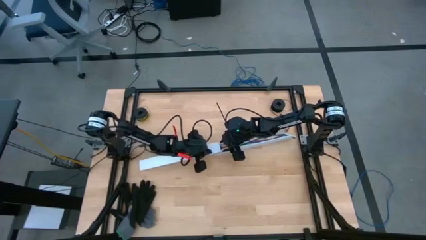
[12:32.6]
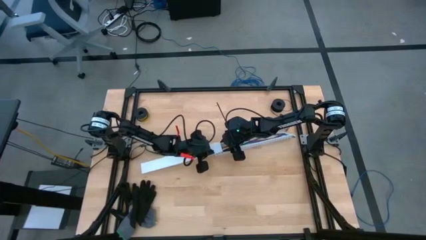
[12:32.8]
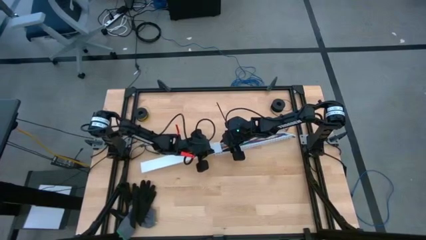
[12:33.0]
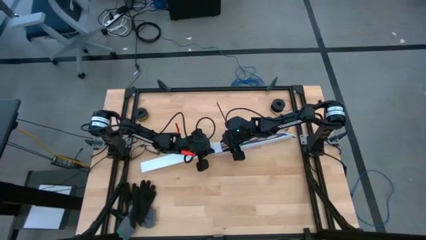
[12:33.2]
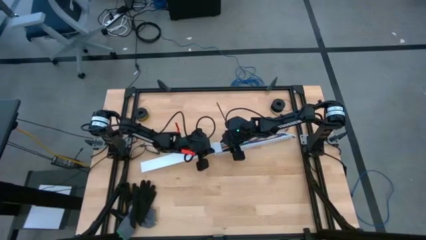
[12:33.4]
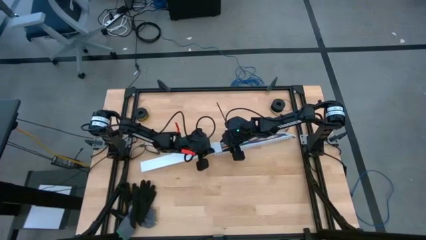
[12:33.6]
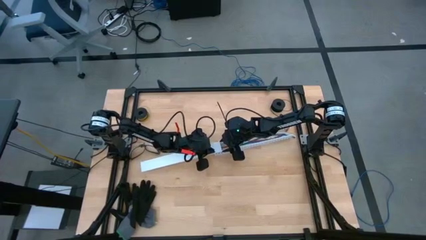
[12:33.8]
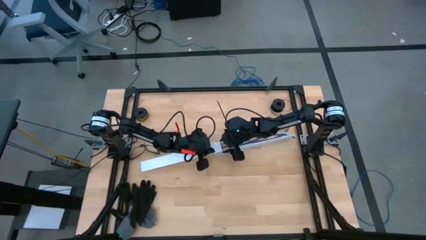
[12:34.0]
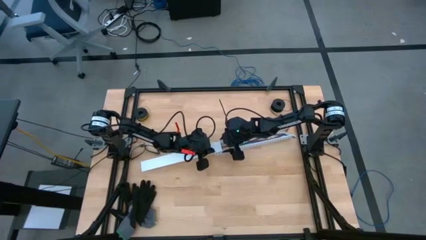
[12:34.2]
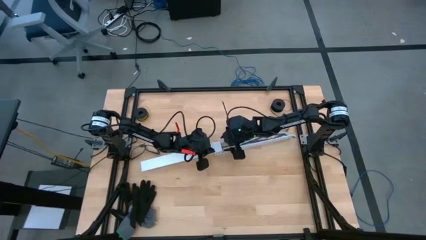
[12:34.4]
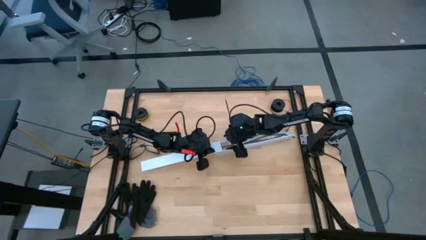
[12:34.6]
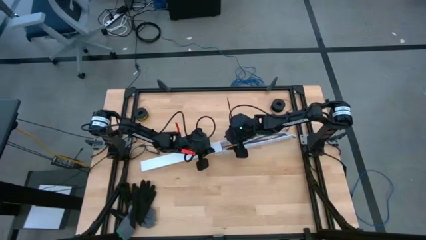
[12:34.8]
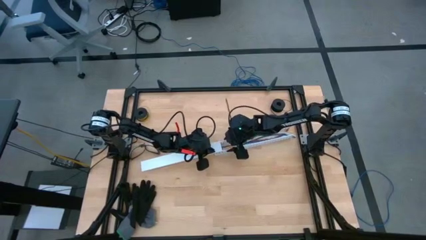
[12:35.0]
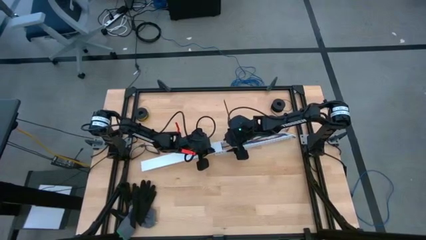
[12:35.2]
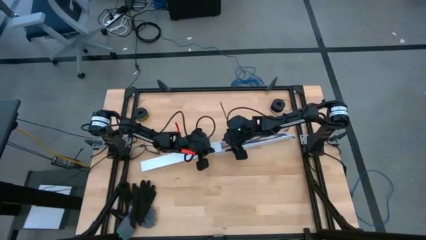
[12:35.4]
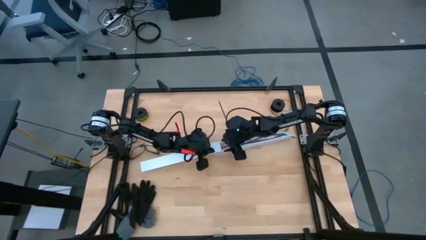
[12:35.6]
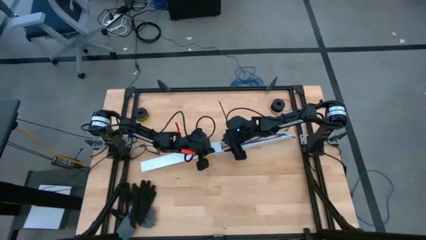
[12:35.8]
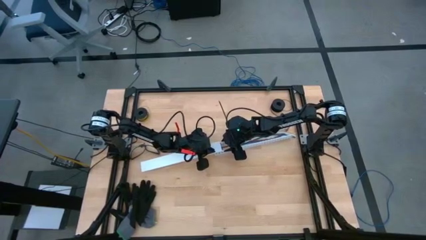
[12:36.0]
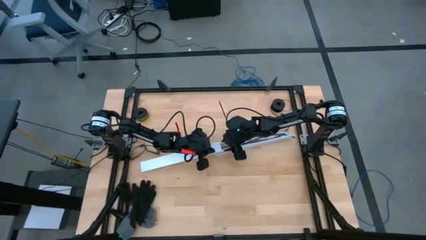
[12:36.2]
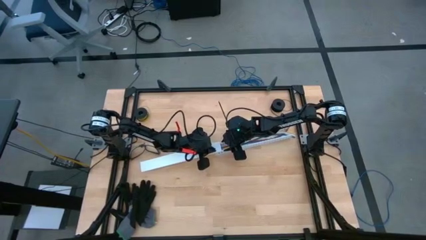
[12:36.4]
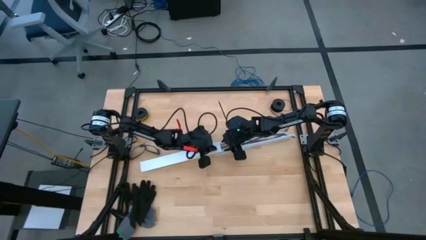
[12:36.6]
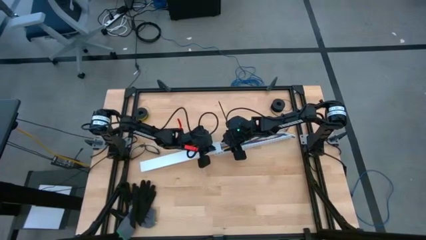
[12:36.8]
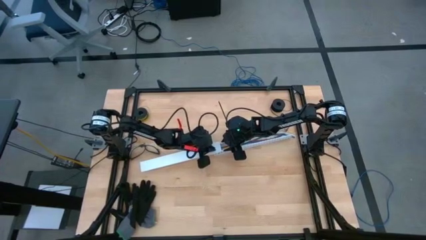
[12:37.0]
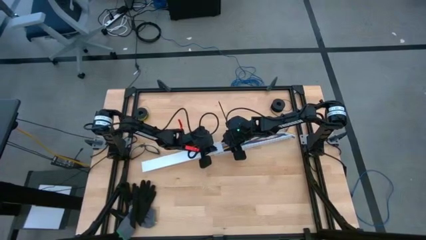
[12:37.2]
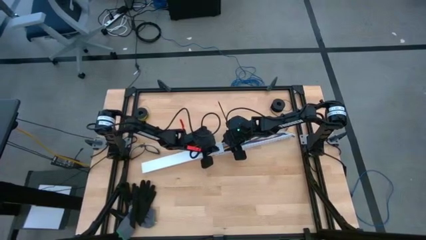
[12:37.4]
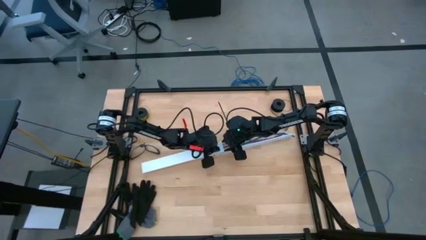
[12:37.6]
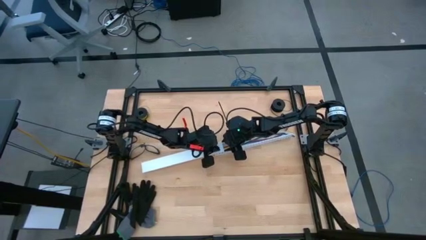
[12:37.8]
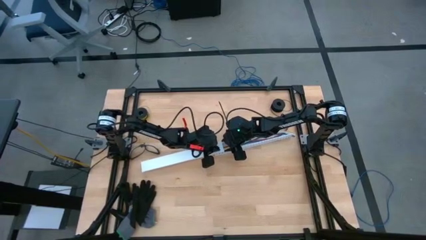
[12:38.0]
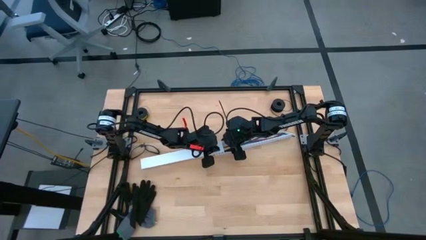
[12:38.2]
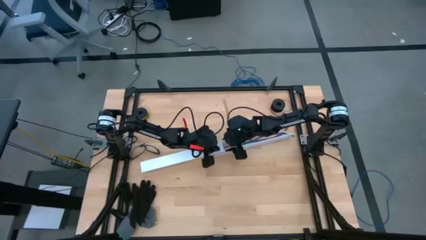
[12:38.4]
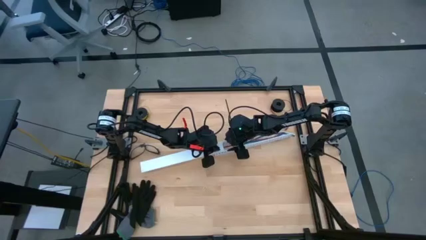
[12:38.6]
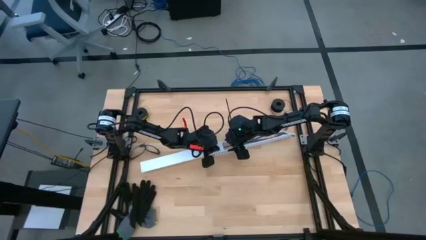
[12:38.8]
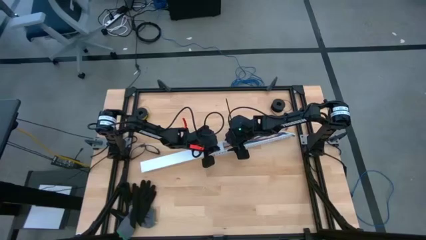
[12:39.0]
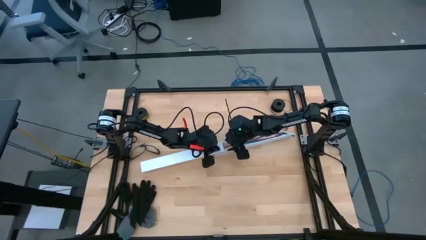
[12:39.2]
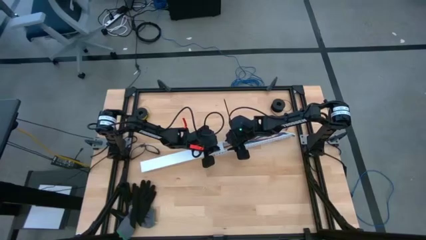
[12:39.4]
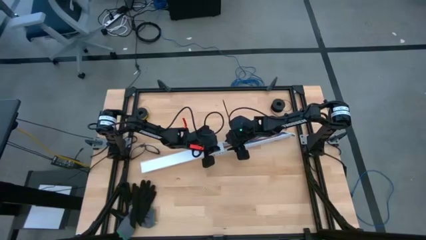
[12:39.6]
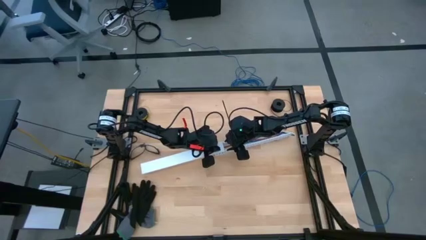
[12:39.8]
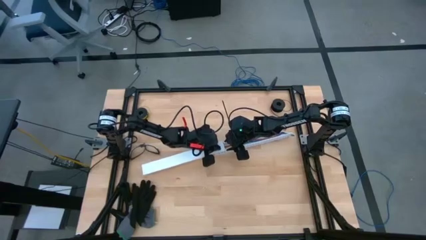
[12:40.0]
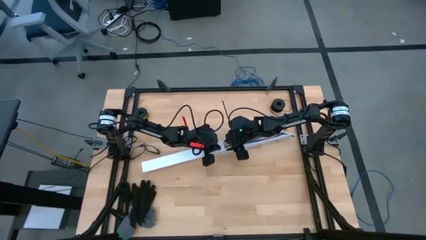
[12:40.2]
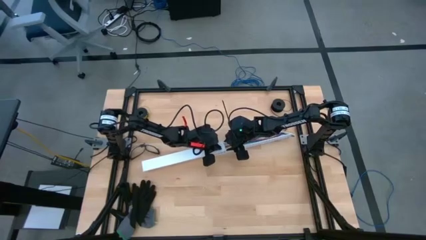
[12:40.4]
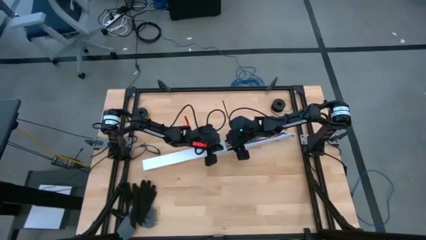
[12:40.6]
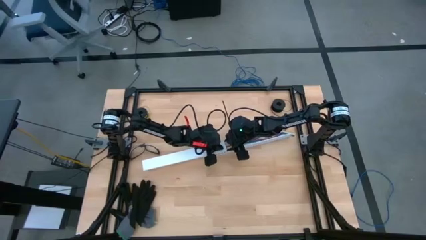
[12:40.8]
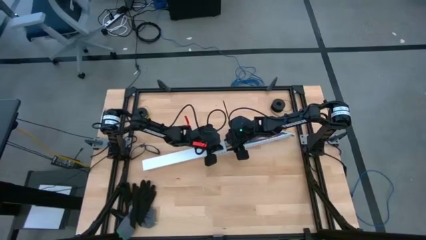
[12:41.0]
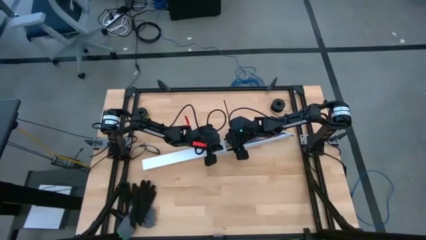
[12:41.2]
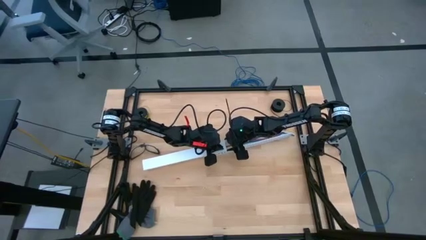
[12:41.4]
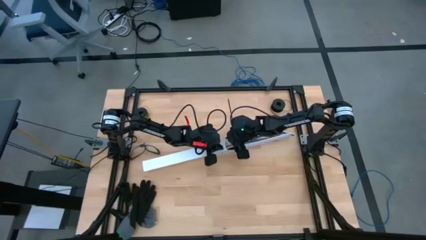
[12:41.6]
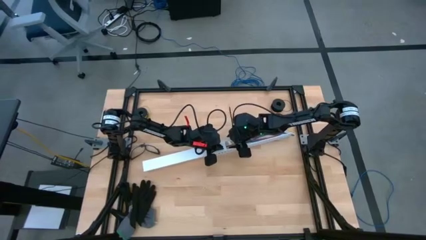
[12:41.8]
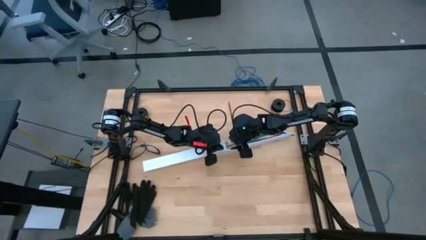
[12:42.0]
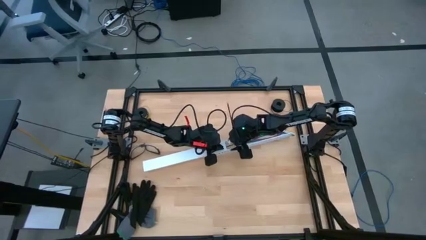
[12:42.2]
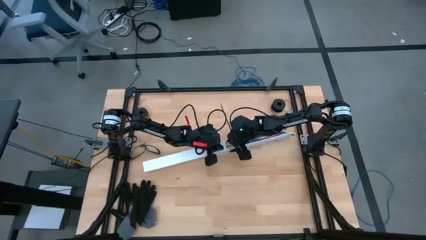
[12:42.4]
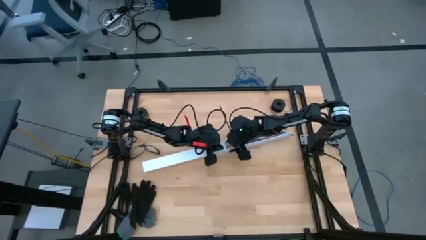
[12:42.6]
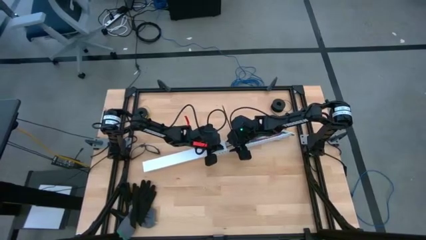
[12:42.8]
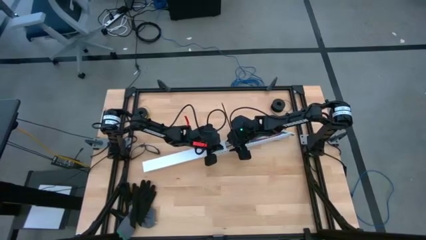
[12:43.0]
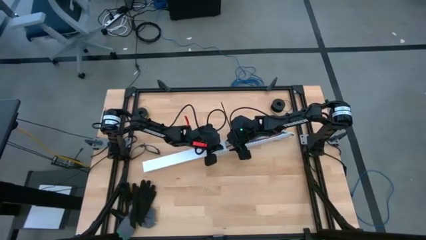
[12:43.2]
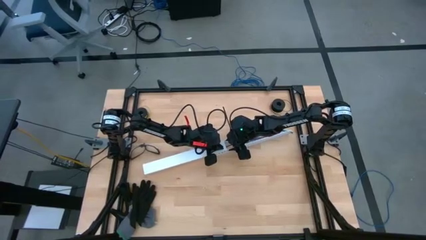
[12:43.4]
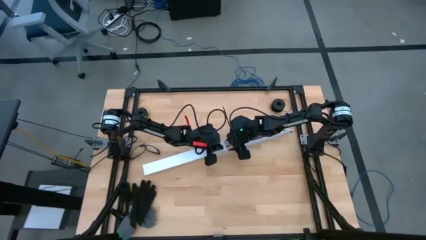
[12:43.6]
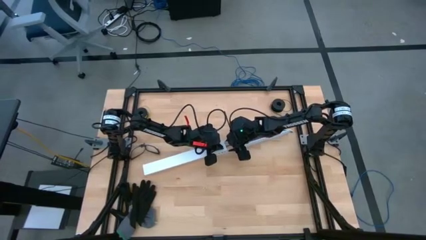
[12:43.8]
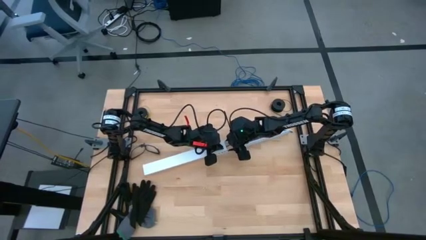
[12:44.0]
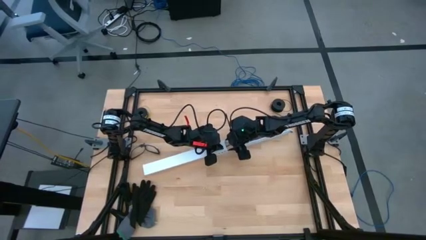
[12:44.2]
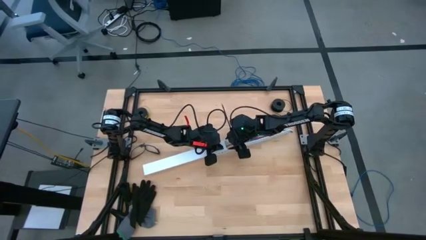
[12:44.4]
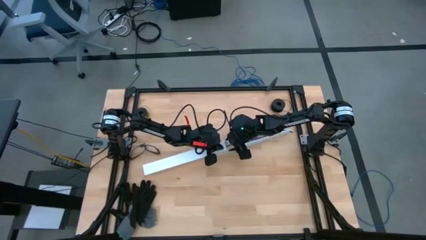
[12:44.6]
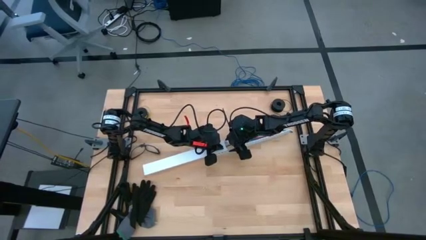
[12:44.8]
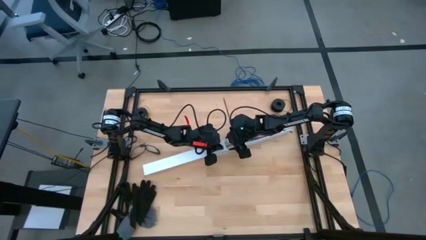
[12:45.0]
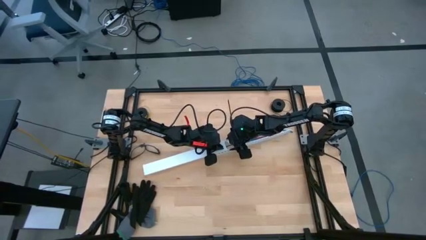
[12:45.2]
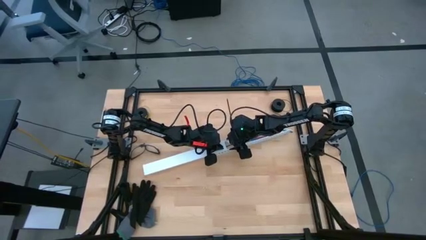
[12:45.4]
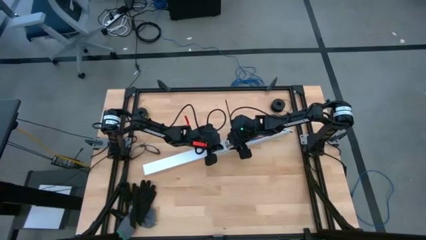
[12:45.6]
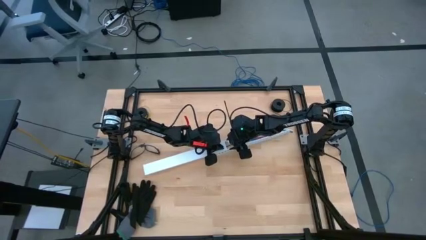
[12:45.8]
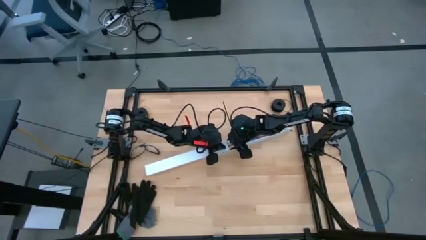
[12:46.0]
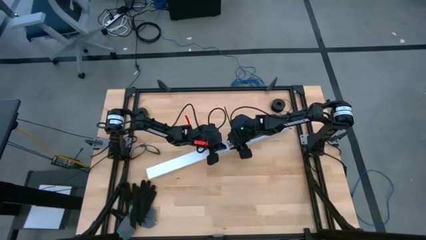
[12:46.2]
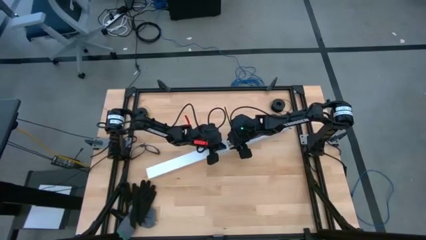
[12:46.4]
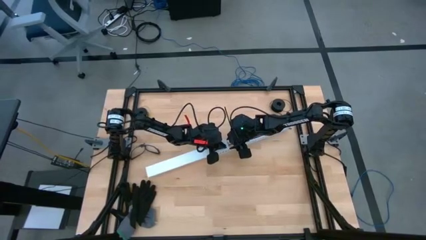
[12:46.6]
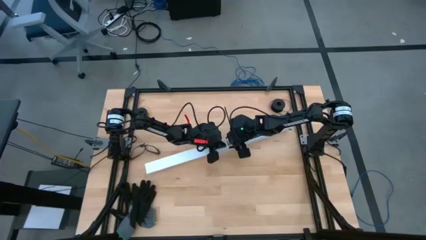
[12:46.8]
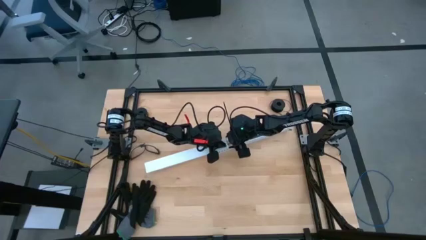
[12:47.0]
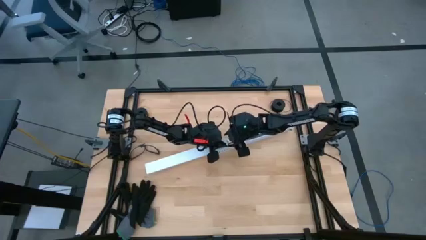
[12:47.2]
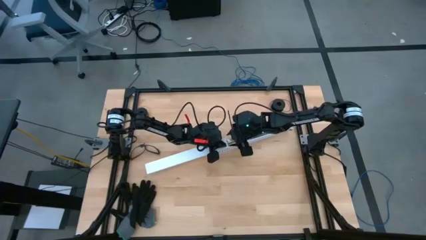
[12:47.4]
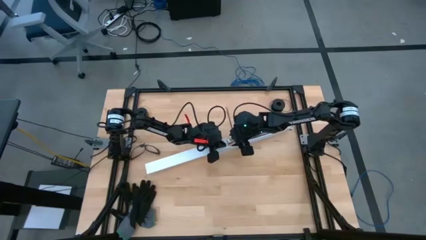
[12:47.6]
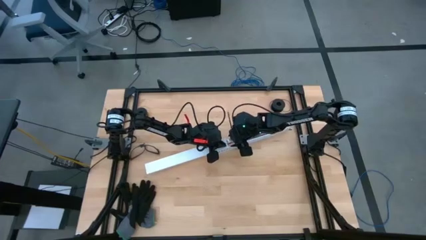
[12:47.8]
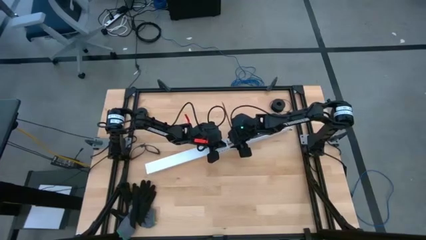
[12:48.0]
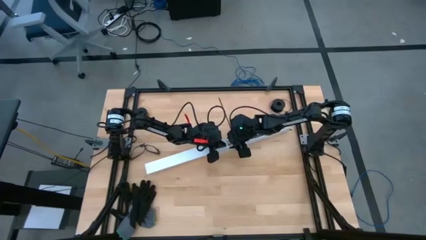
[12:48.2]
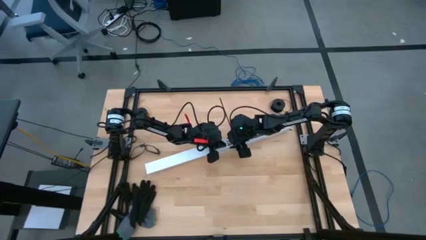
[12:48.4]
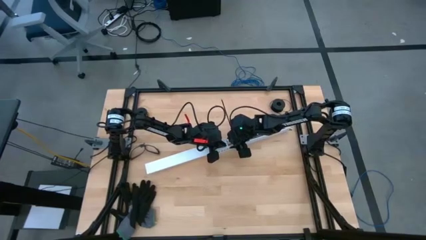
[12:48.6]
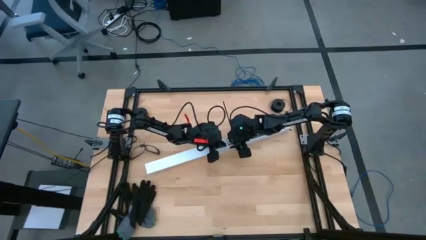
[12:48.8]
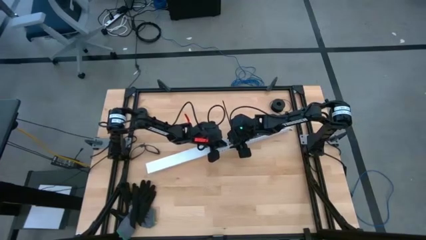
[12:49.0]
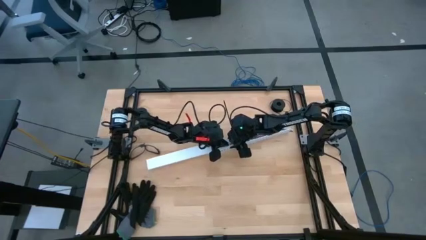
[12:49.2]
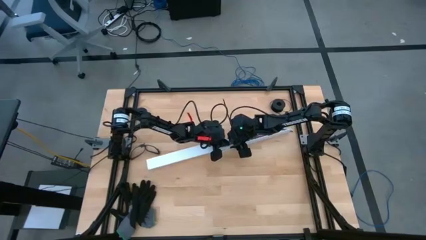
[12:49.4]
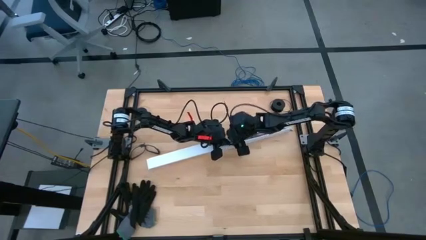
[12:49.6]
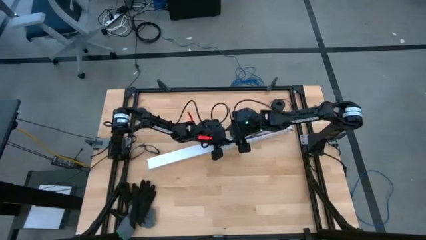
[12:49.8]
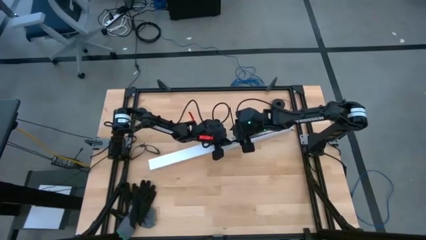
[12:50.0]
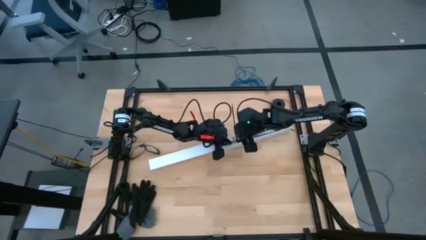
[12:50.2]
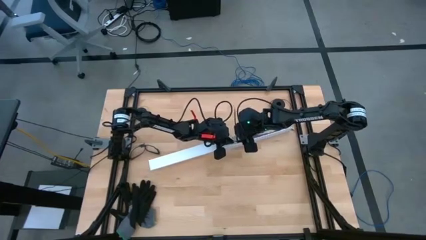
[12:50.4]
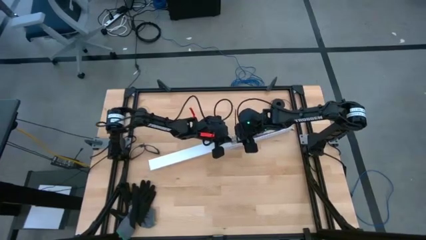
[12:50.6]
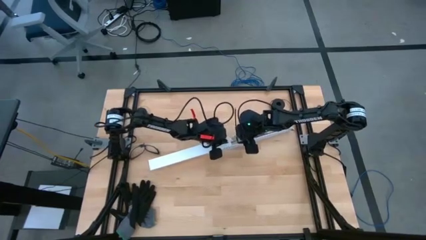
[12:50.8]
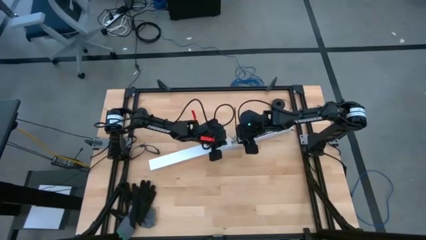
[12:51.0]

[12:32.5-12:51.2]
Task: Ziptie cables
Close the white cable duct
